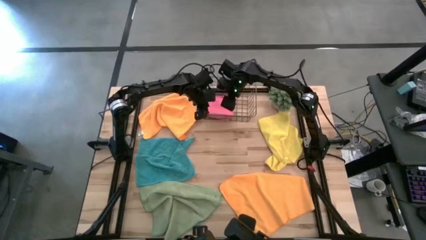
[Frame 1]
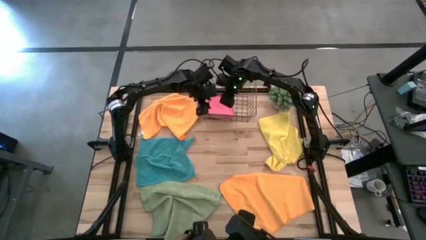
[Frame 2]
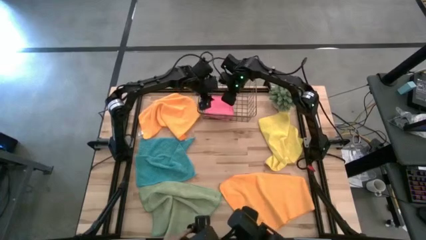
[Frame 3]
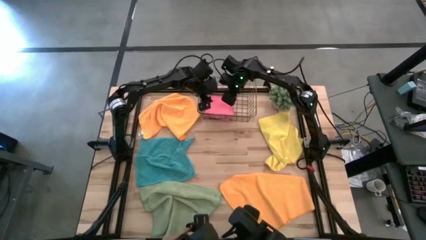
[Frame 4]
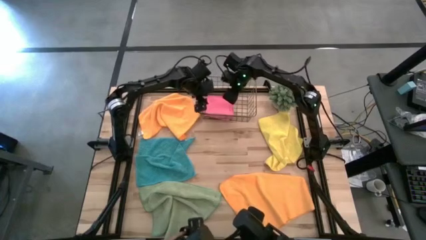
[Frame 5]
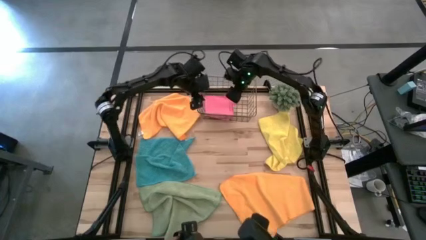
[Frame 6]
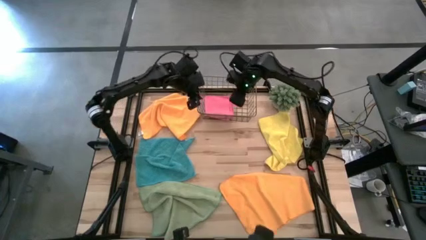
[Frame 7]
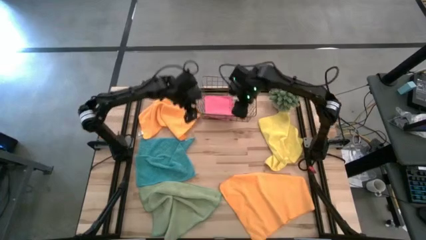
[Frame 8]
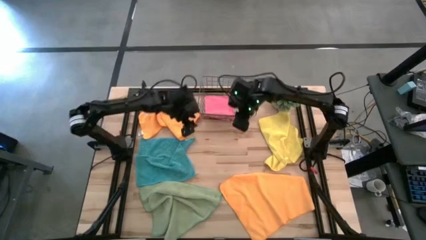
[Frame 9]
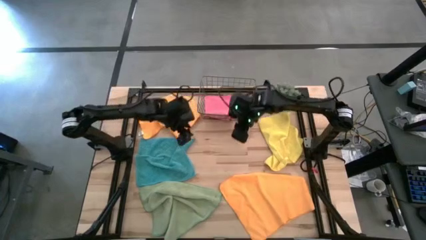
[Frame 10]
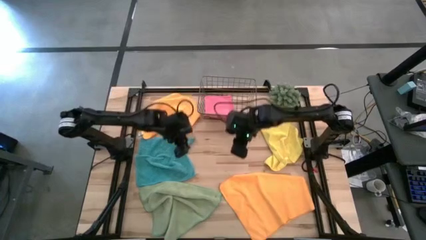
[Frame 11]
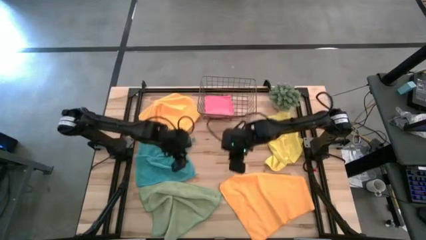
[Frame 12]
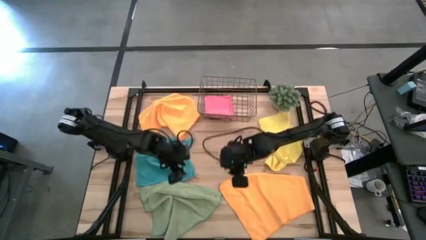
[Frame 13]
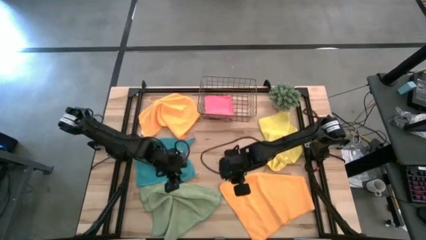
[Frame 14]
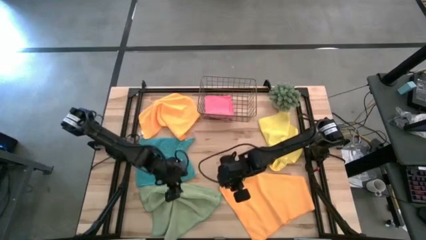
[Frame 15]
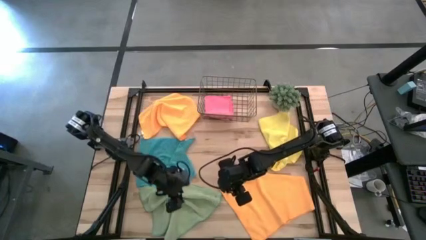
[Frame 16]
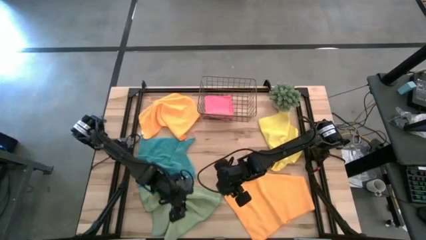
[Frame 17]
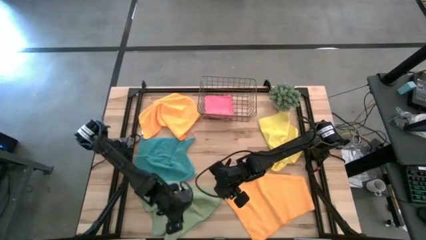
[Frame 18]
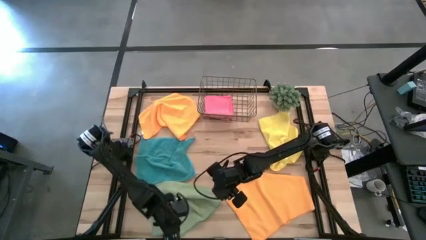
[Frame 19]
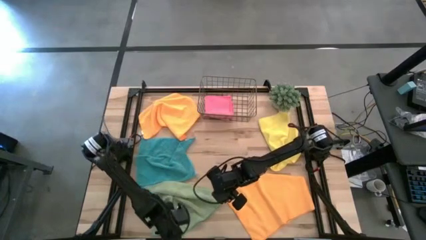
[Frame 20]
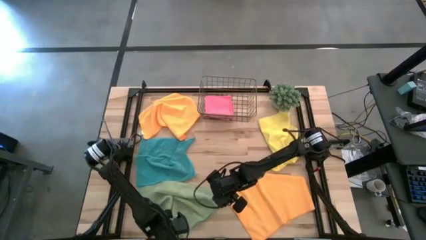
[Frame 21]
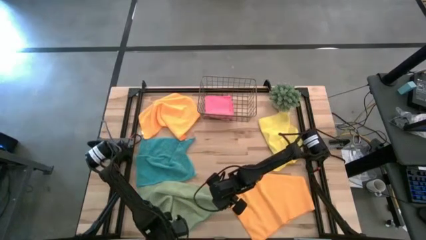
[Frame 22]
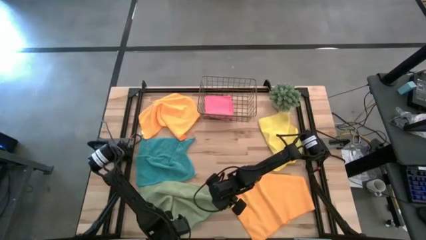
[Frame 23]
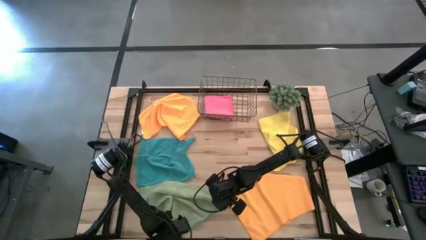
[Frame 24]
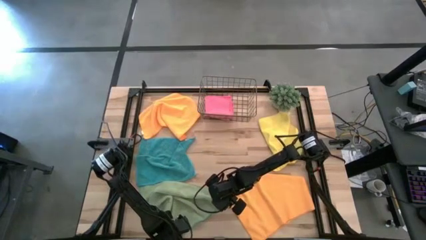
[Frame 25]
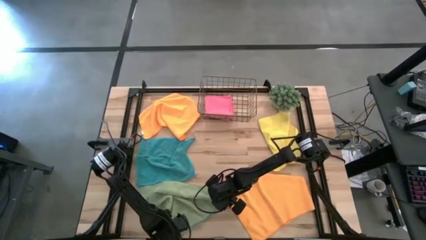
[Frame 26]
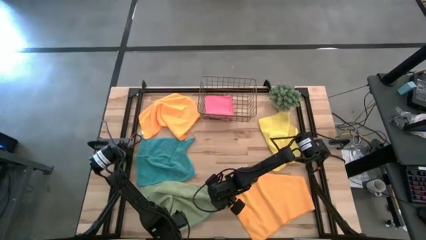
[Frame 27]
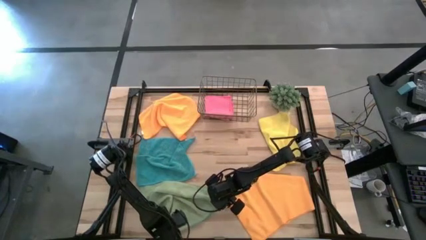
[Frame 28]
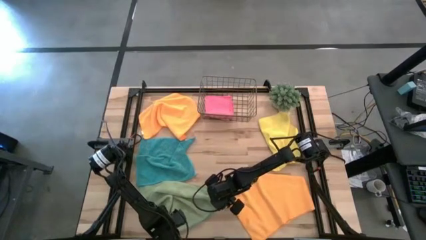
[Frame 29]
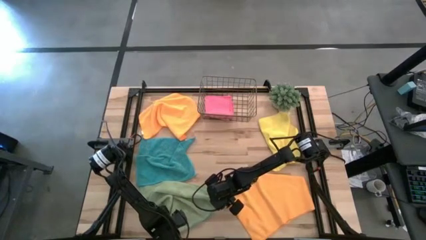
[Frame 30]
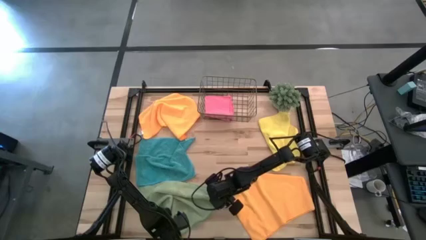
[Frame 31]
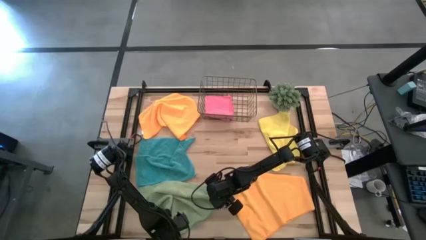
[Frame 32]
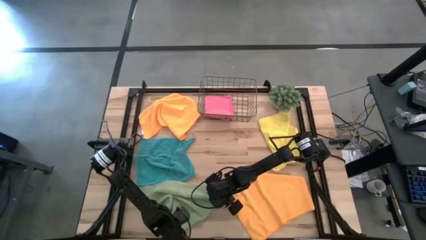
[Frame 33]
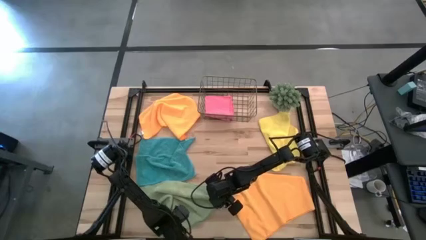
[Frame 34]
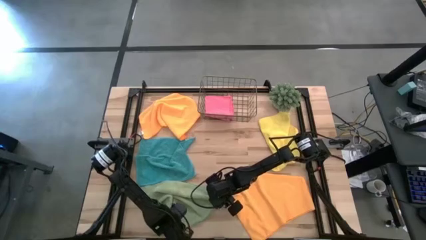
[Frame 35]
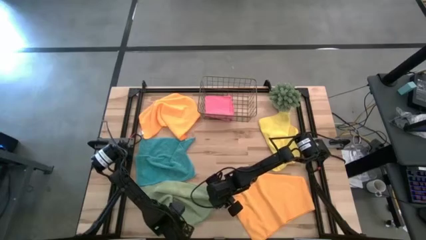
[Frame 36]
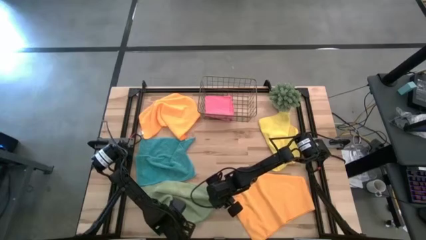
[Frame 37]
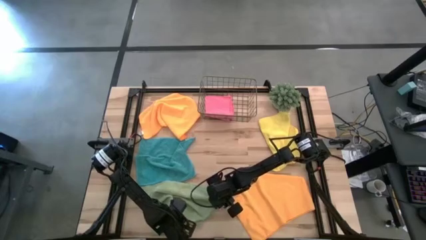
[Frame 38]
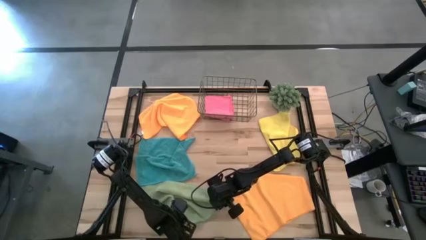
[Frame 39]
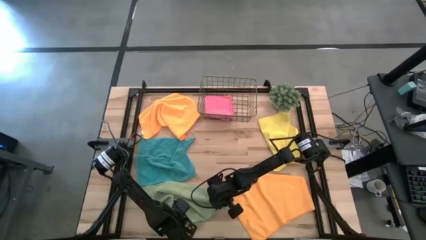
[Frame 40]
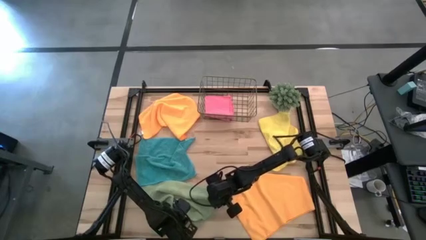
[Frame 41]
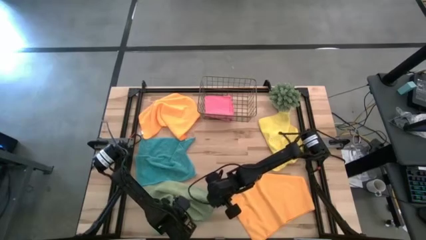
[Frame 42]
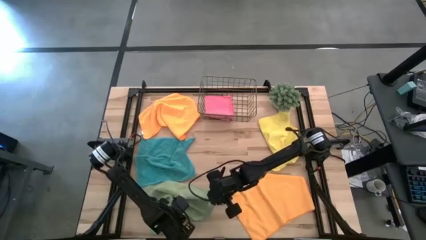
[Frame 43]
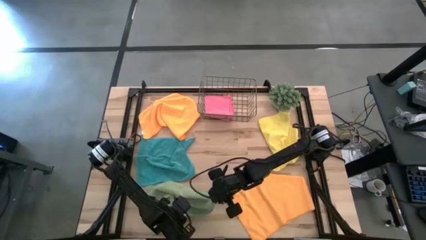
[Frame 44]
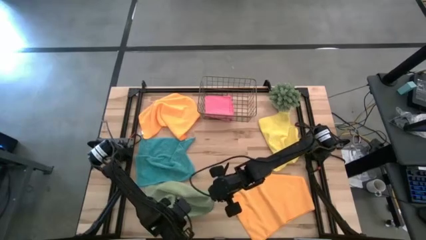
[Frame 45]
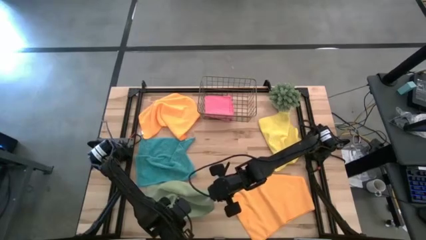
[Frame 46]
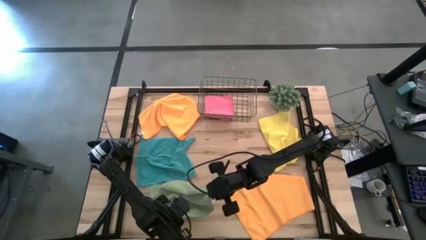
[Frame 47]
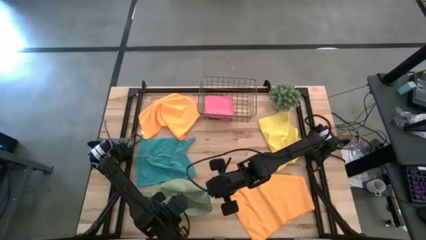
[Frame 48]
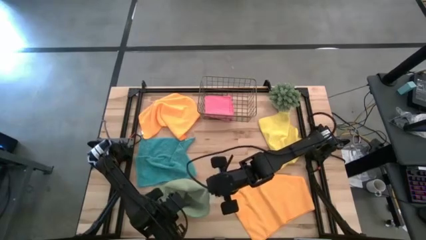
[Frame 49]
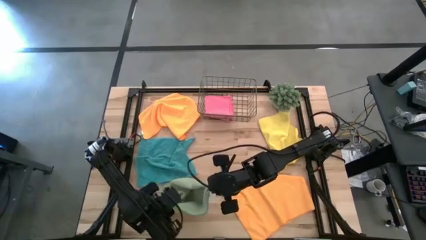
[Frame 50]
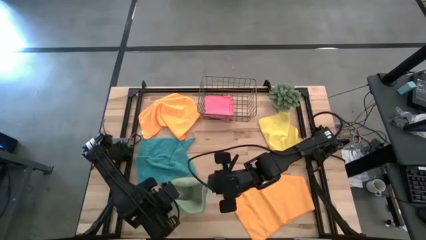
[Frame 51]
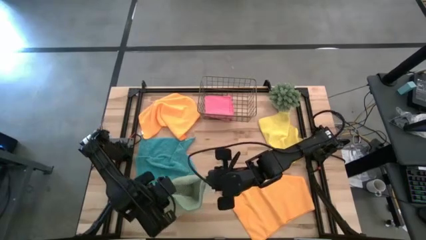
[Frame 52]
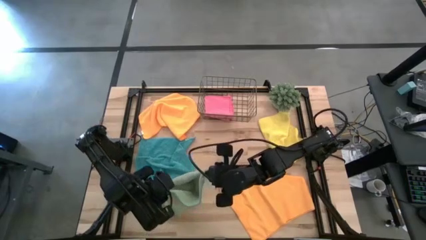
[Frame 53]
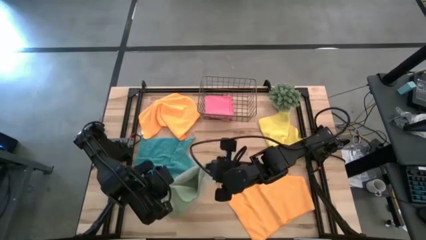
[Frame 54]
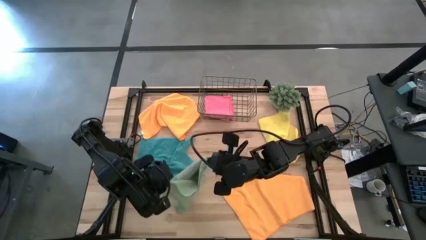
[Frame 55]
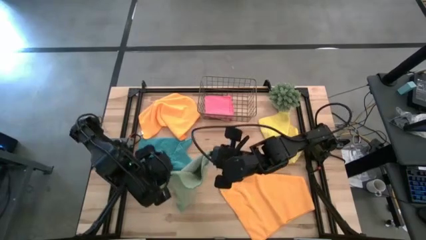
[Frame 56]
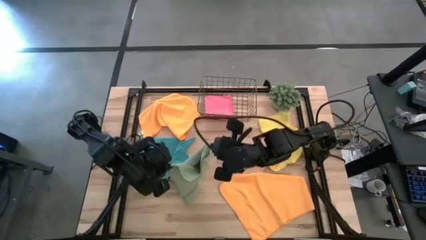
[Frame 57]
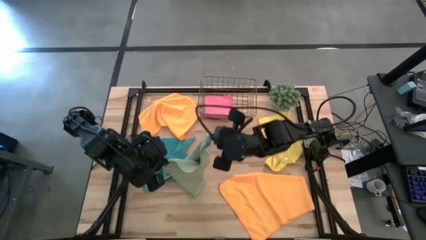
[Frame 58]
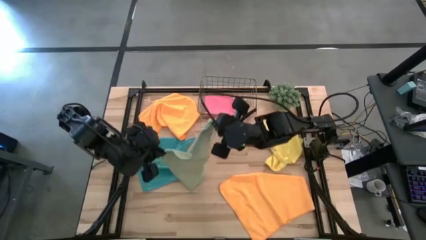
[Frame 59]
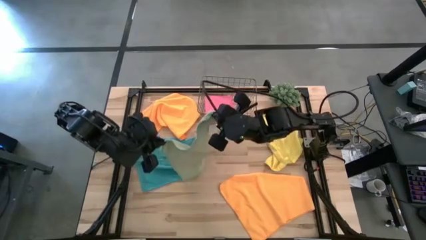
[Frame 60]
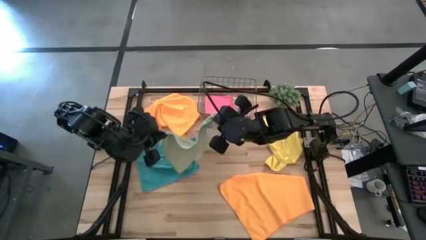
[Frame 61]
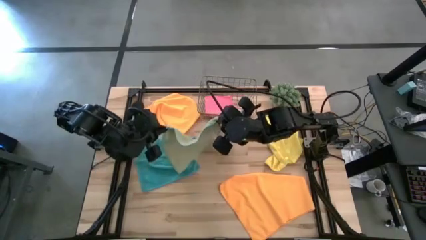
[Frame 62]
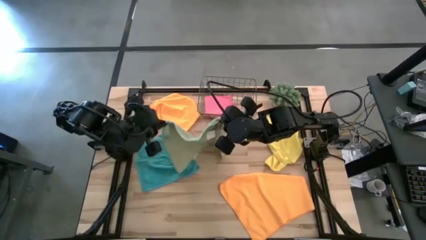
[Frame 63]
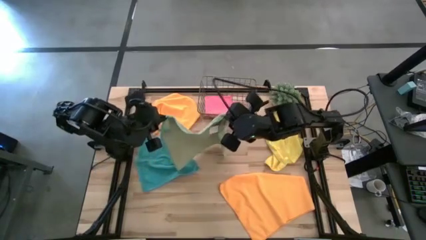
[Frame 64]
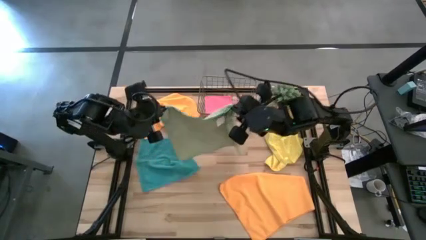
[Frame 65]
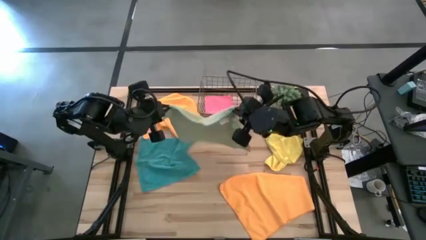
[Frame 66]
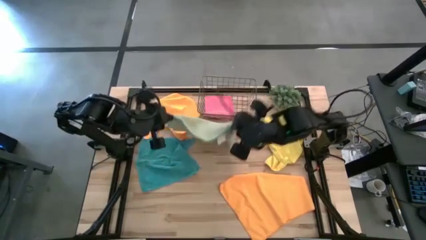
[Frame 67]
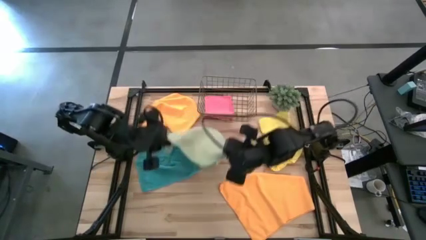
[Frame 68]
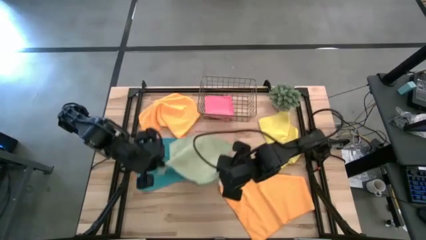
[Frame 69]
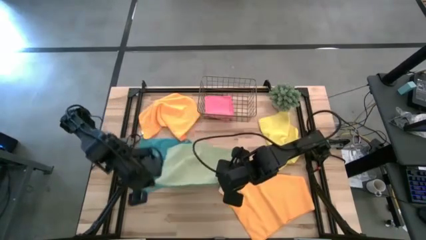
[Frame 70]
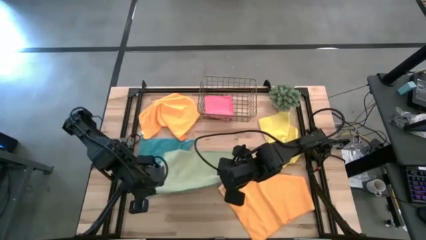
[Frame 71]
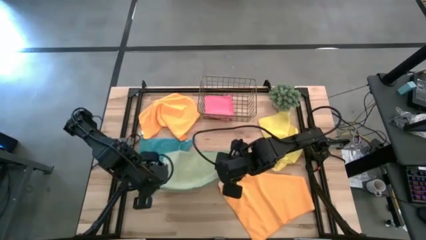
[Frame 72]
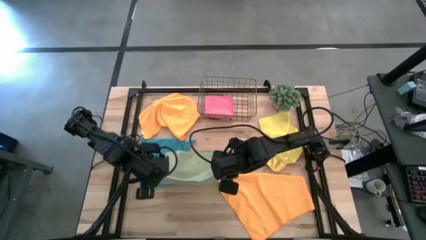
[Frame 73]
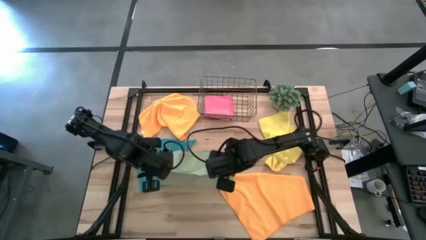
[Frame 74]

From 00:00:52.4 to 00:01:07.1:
Task: Fold microfiber towels
Fold the green microfiber cloth

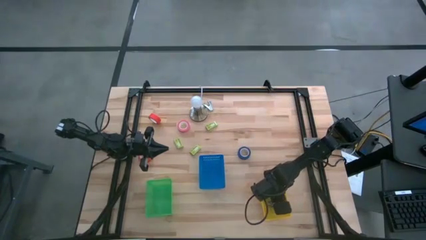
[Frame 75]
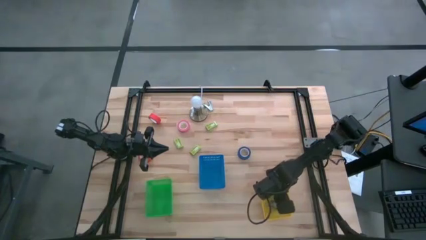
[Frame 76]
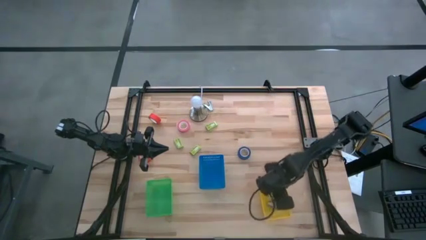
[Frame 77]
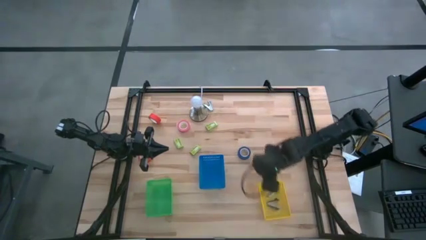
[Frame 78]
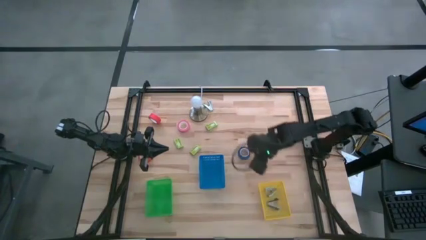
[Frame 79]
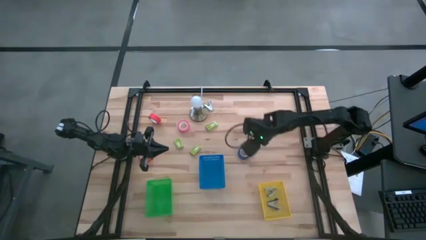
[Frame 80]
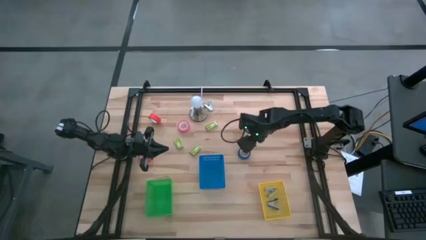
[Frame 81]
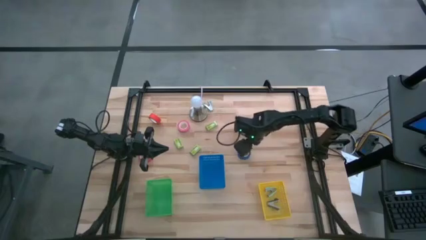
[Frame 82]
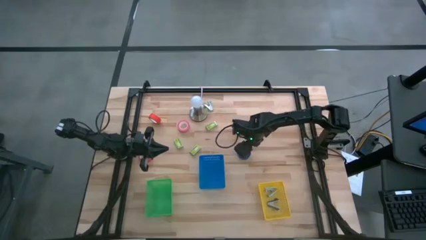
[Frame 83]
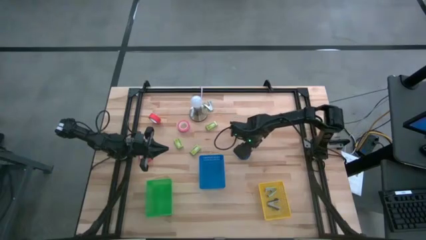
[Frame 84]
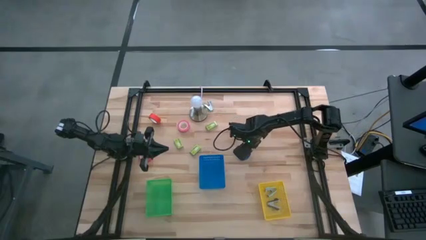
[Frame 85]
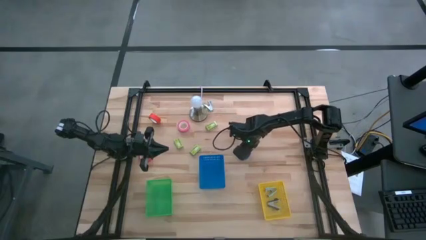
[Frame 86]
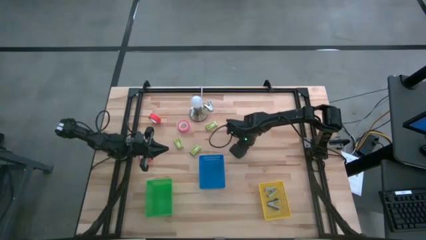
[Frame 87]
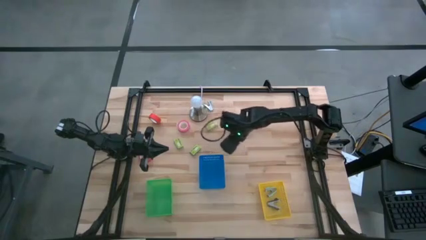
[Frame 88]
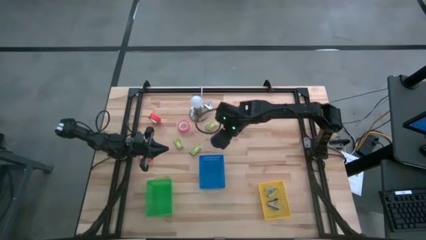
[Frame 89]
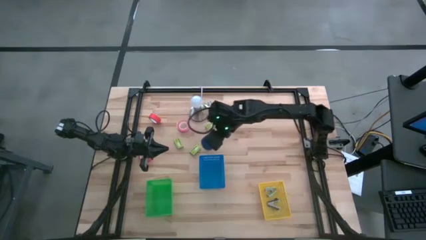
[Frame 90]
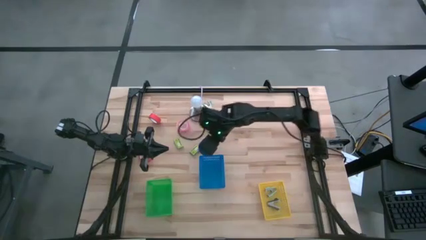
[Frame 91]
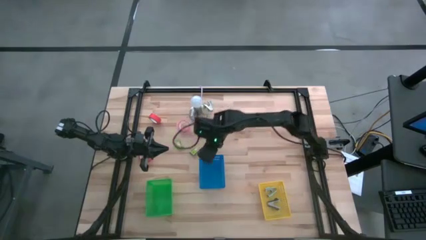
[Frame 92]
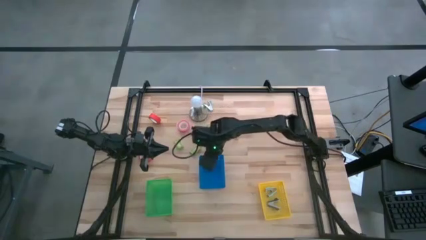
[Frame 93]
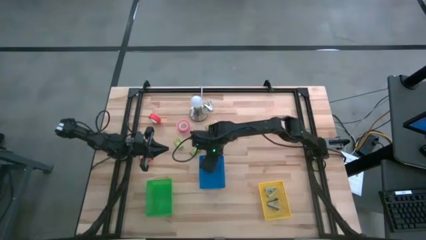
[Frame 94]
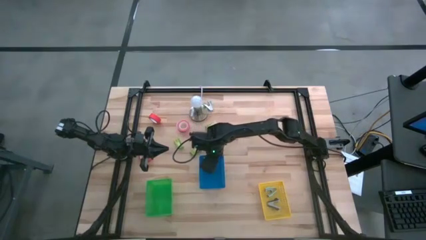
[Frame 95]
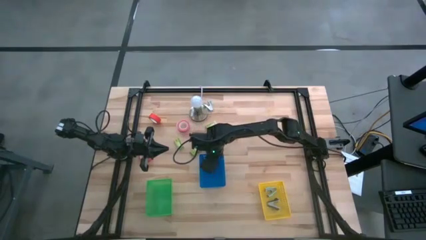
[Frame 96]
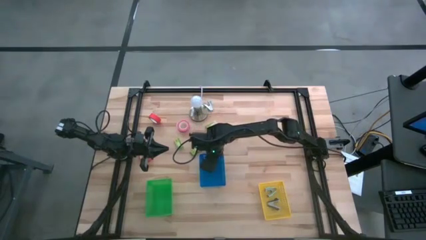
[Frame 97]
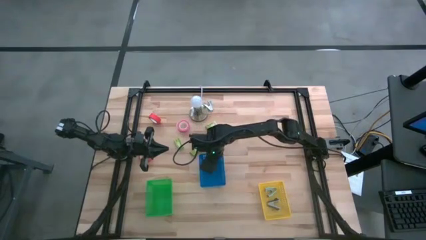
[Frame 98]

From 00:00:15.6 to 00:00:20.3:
Task: Pick and place Stapler, Stapler remover, tape
Put the blue tape into the blue bin
